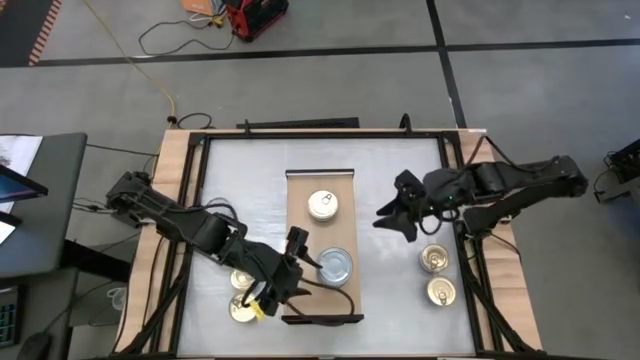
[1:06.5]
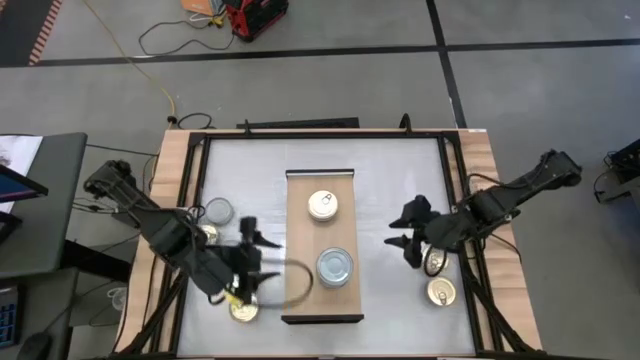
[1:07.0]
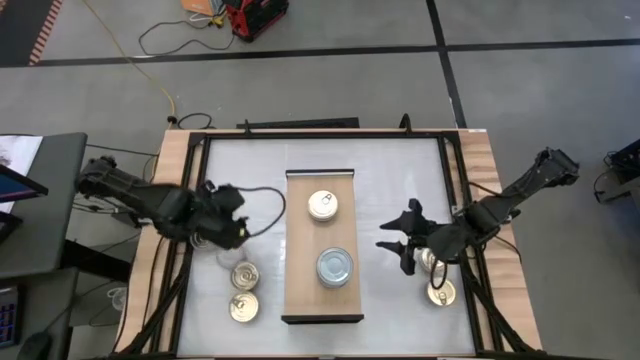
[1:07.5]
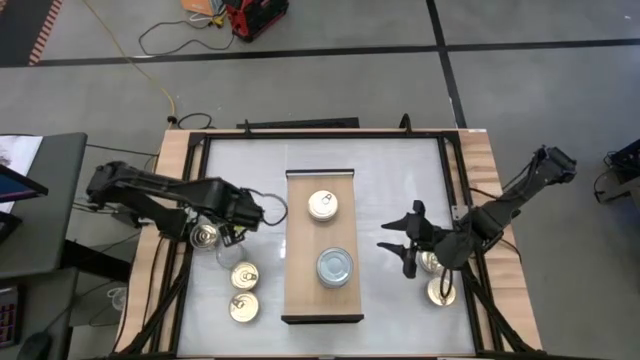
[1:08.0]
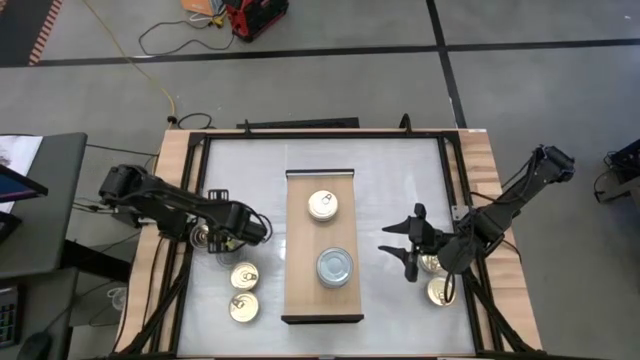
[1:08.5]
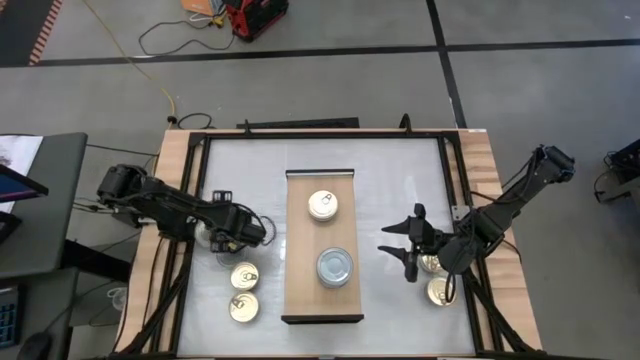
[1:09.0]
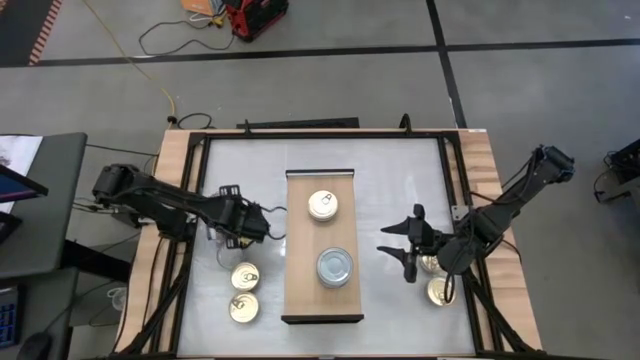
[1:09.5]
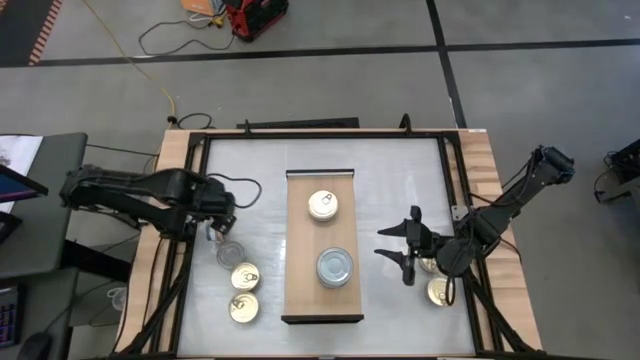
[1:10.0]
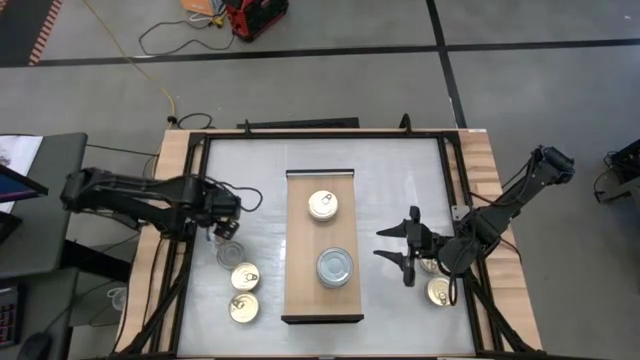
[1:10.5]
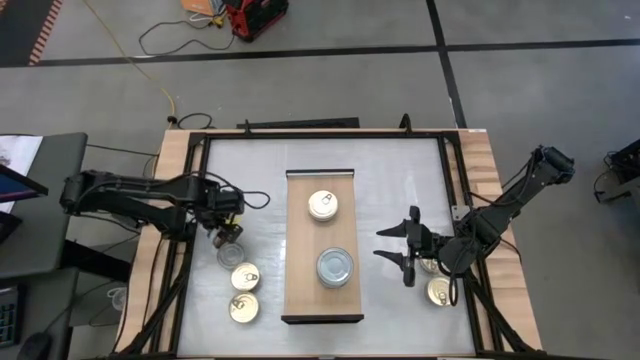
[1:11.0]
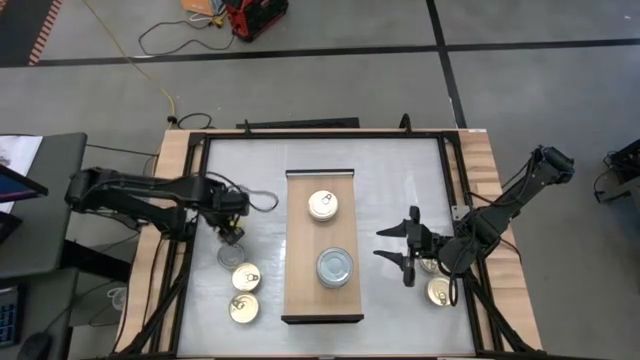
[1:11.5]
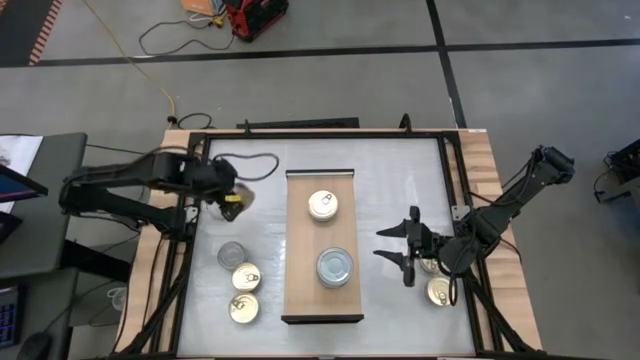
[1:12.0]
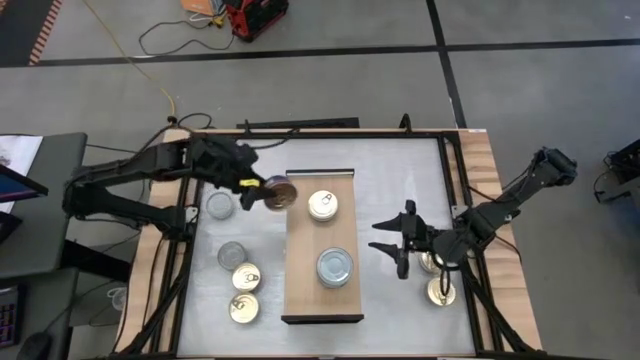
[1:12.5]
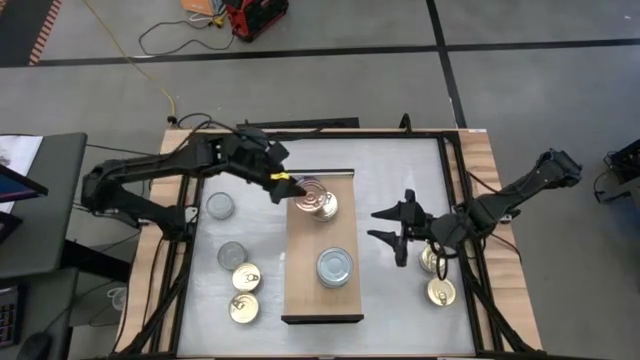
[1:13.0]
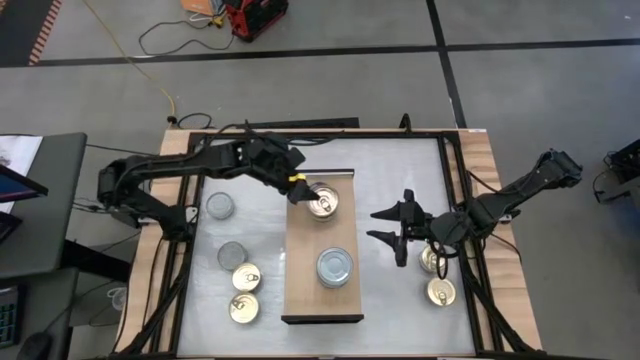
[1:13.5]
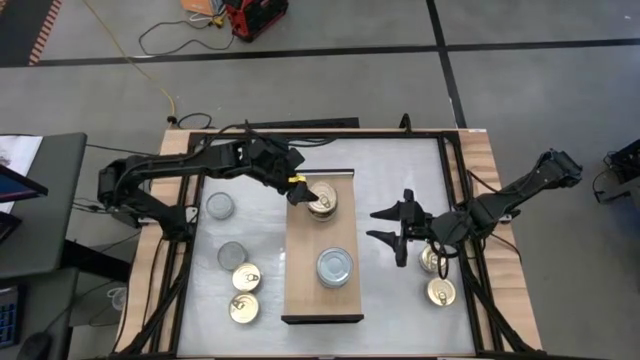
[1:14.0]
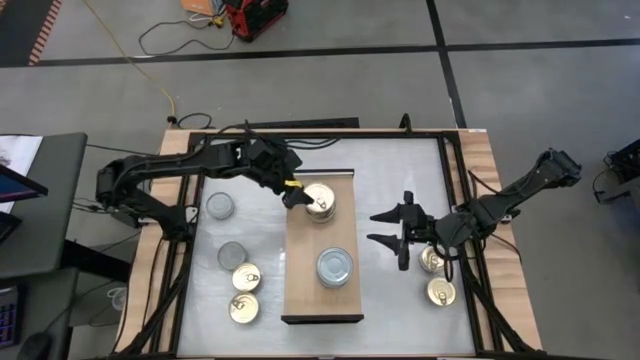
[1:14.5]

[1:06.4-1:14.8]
Task: Stack canned seafood by type on shelf
Stack the blue tuna can on top of the blue tuna can on the shelf

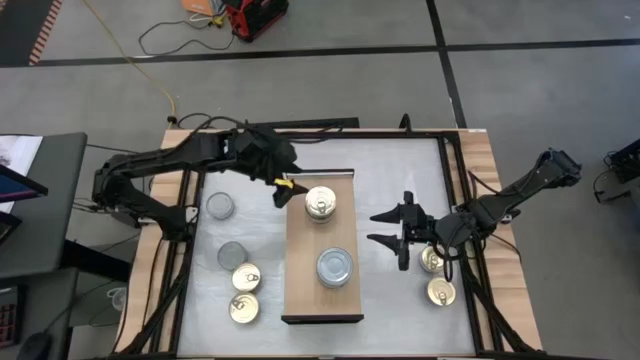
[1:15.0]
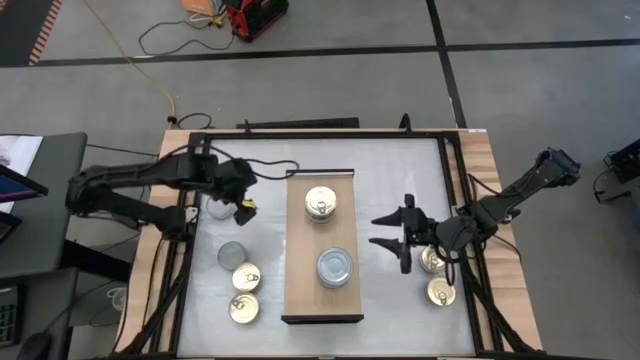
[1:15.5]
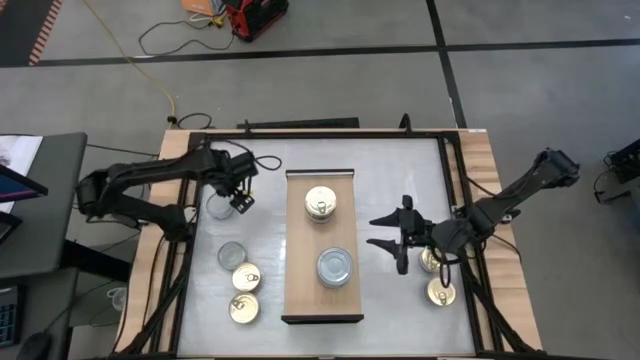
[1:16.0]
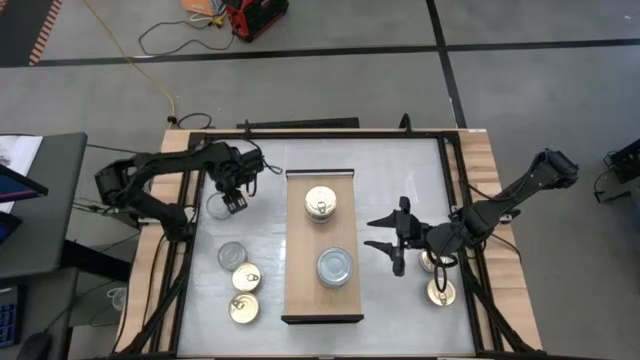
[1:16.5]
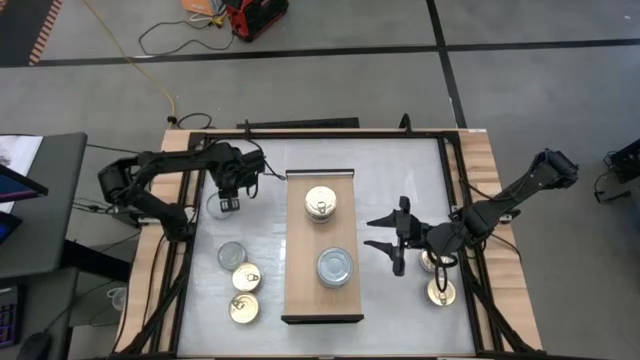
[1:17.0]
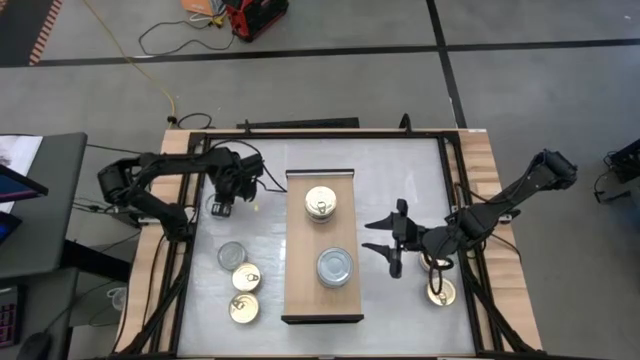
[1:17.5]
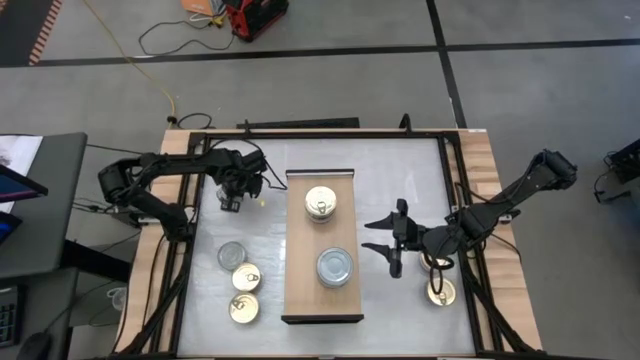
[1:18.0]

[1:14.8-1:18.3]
Stack the green tuna can on top of the stacked green tuna cans on the shelf

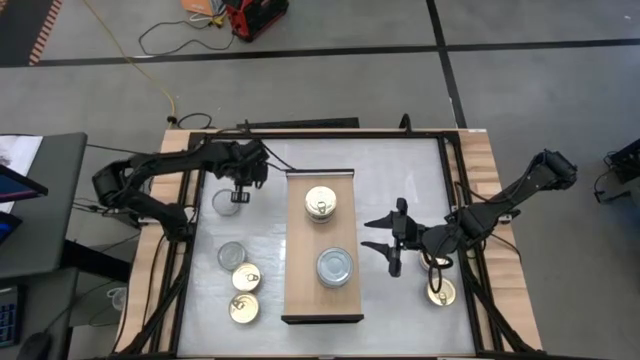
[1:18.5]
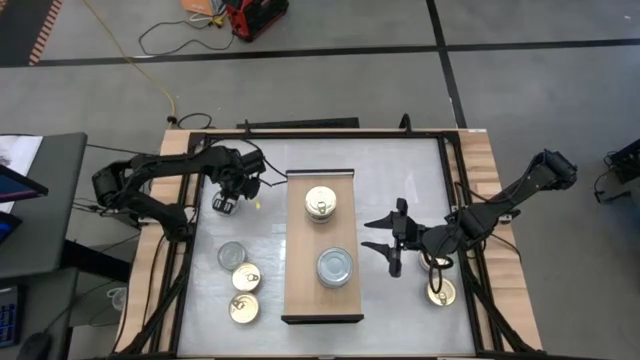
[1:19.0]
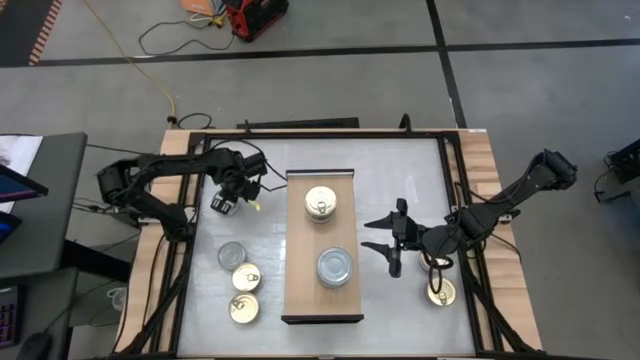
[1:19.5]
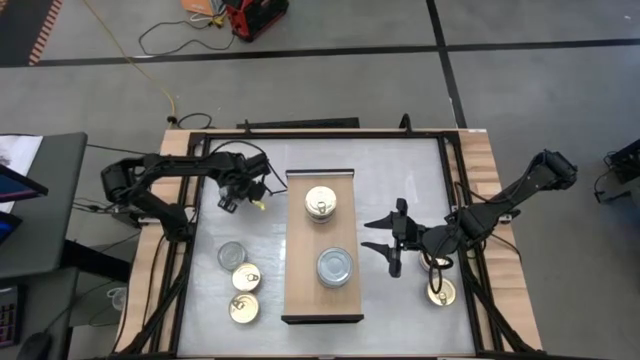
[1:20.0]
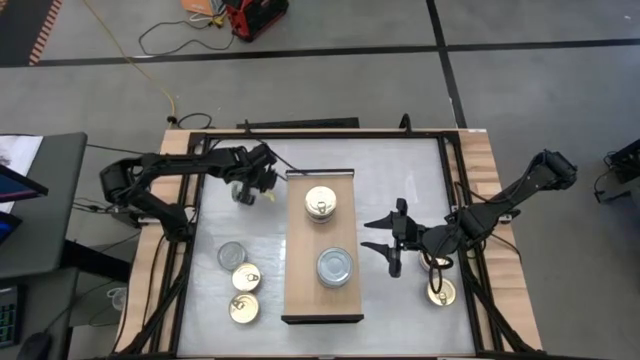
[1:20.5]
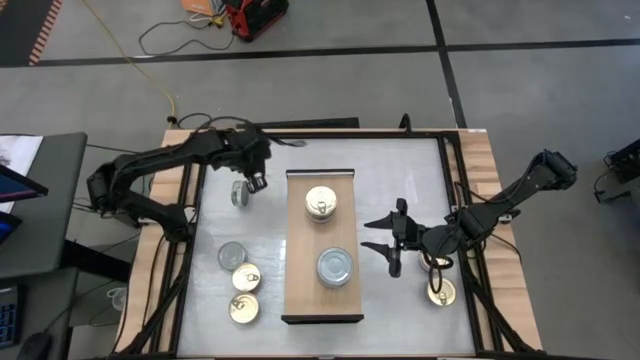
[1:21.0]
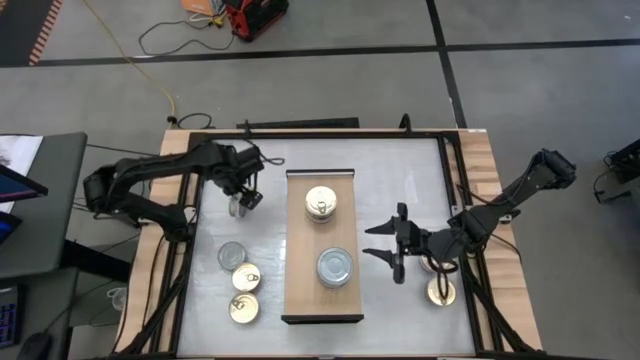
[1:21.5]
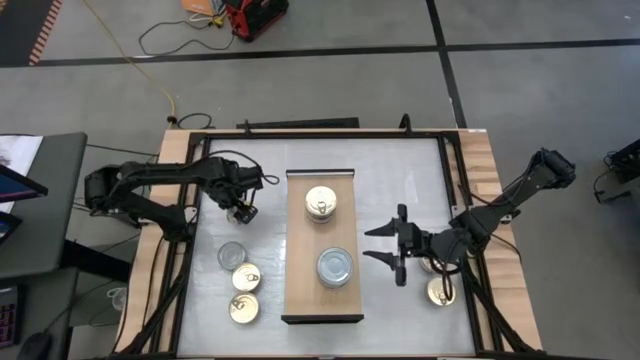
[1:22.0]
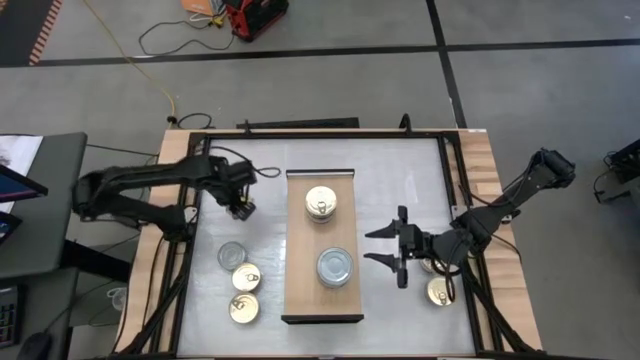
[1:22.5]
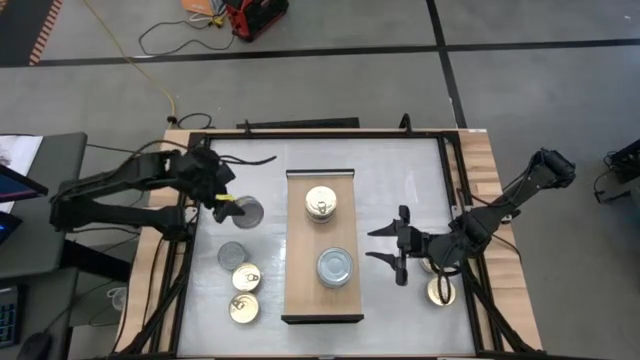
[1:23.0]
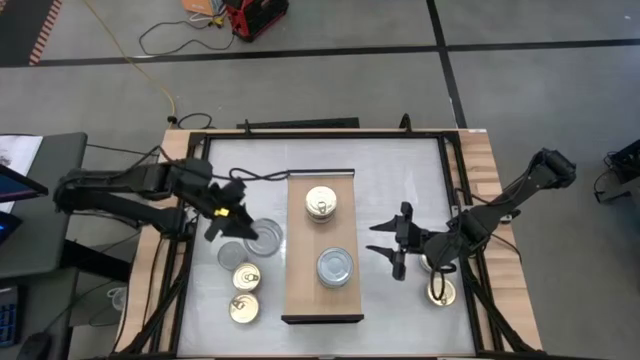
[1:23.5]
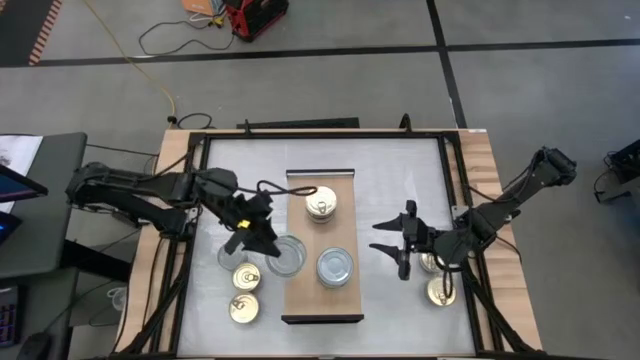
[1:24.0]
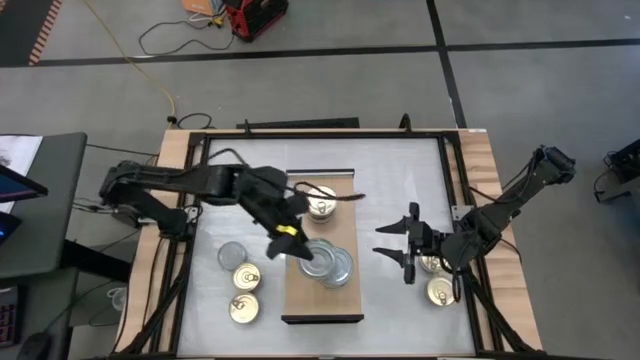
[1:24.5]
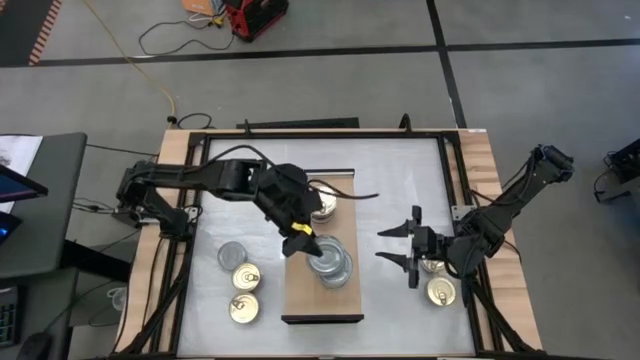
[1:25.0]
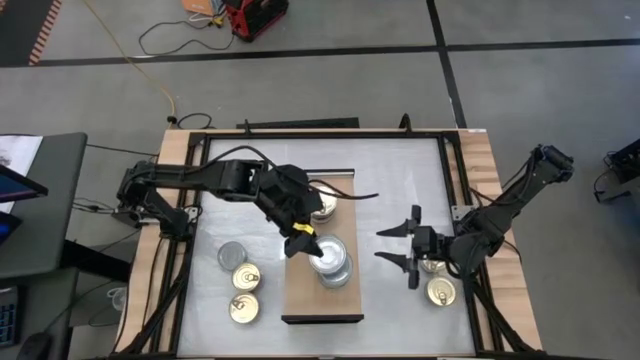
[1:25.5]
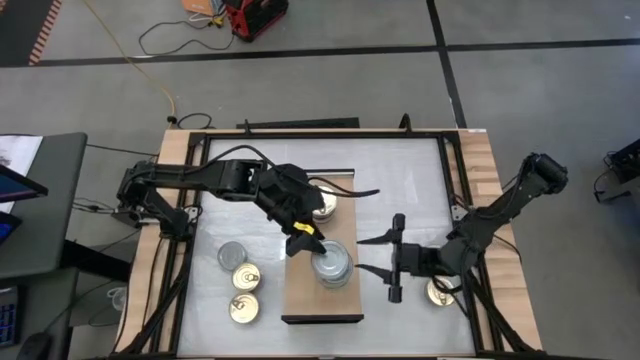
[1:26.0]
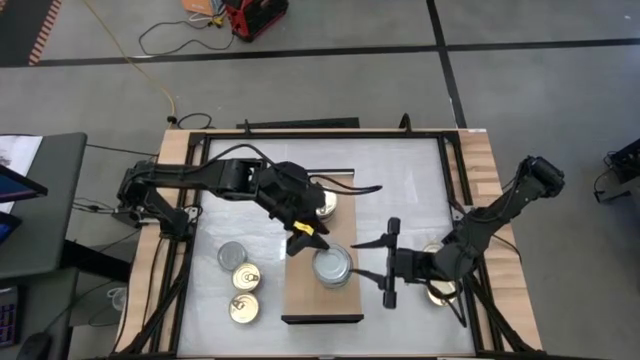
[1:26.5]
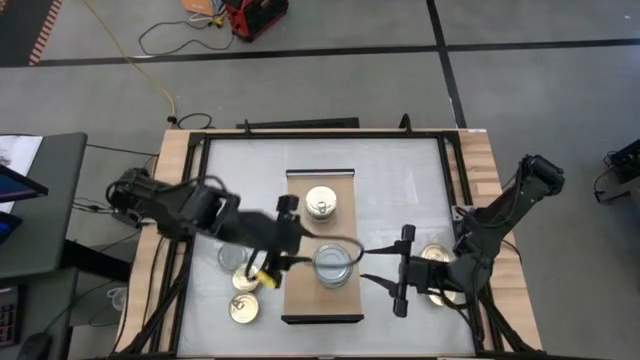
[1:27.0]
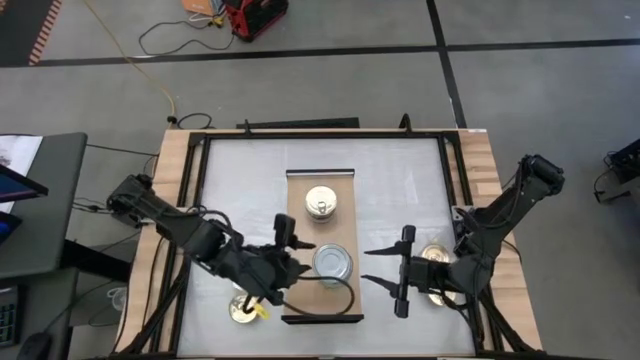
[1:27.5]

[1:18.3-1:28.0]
Stack the green tuna can on top of the stacked green tuna cans on the shelf

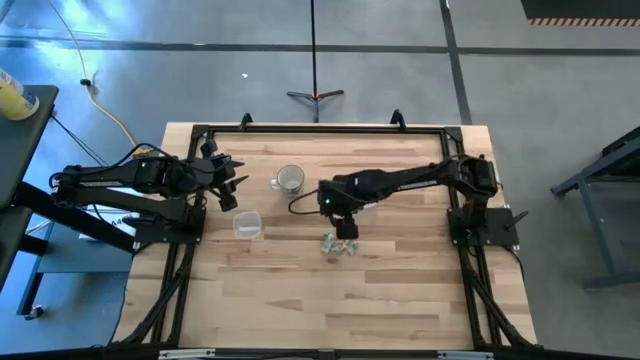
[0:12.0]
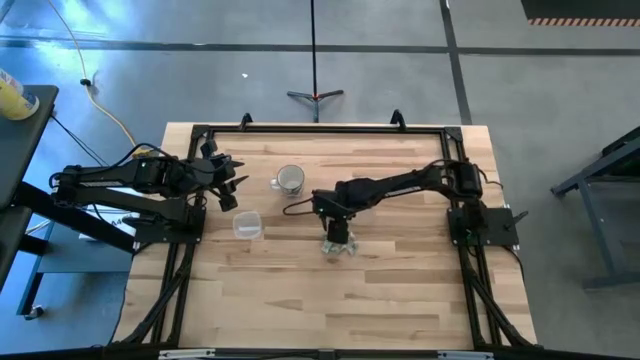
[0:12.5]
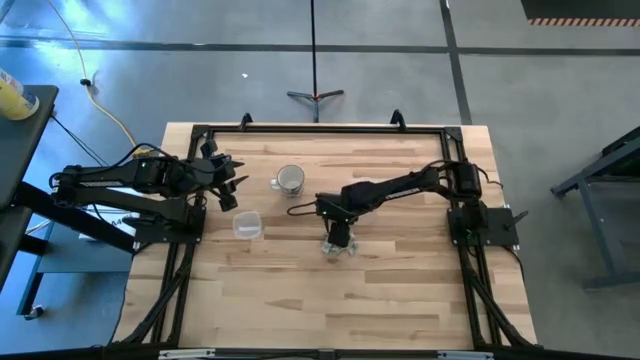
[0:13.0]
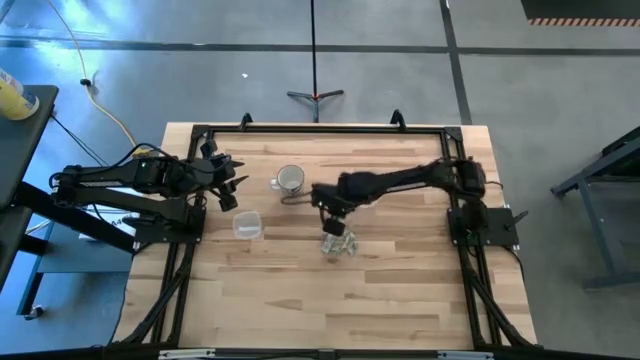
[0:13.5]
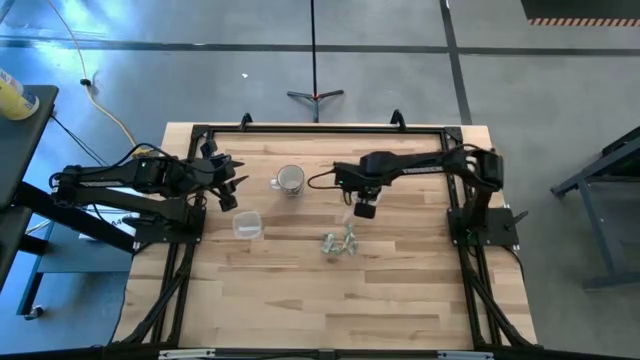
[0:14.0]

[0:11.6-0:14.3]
Task: Pick and place Stevia / Truvia into bins
Put the white stevia packet into the transparent container
